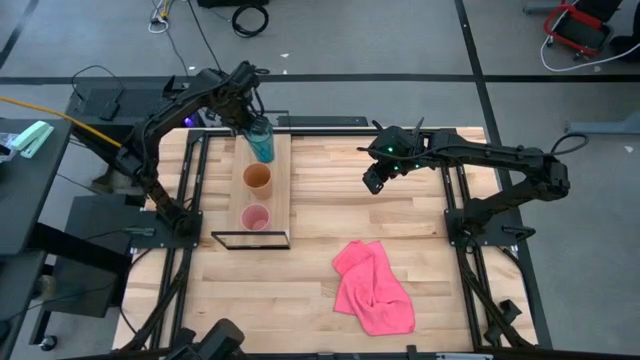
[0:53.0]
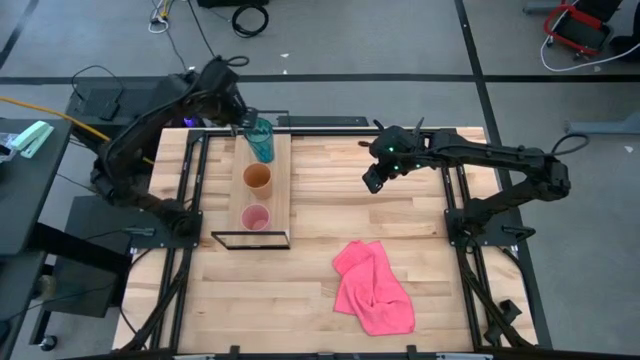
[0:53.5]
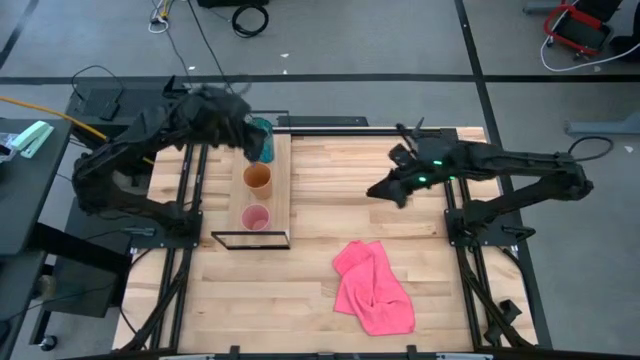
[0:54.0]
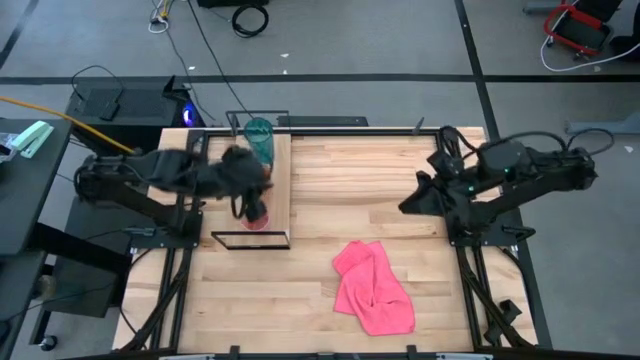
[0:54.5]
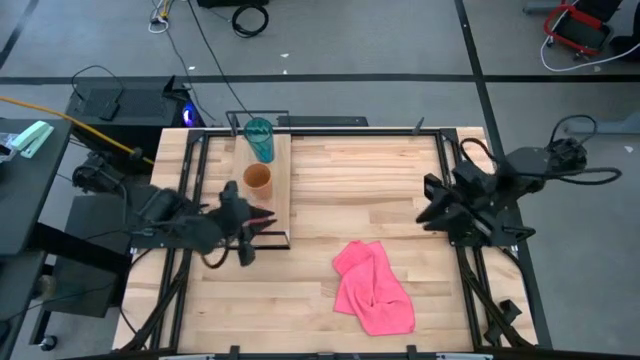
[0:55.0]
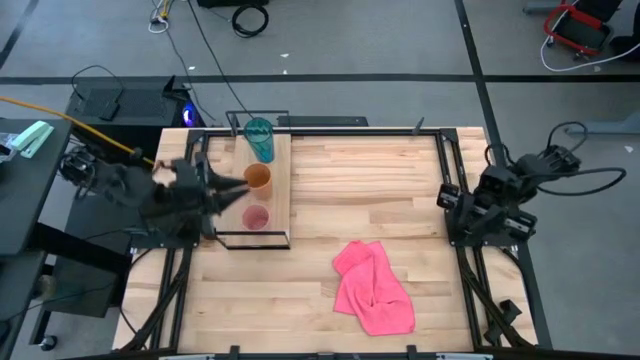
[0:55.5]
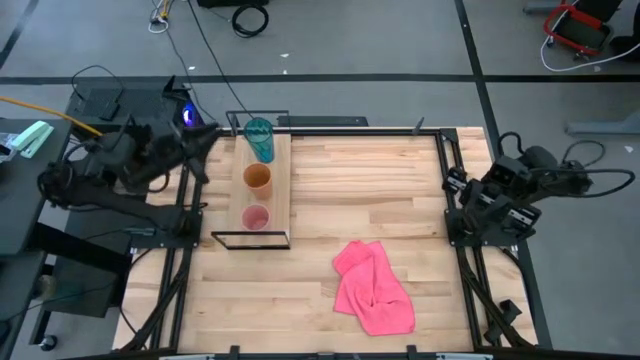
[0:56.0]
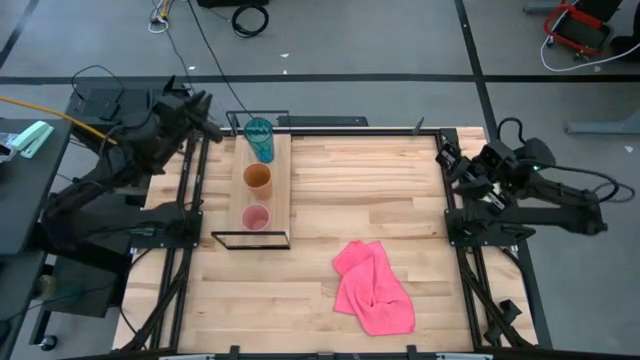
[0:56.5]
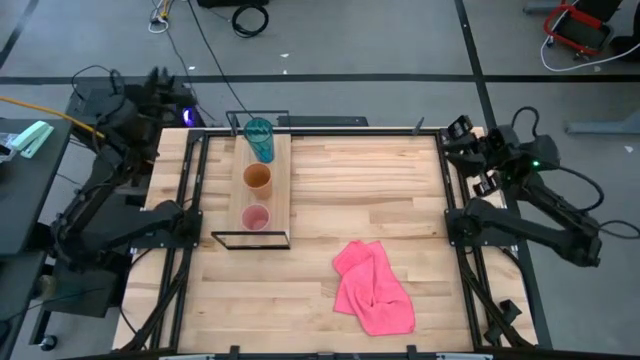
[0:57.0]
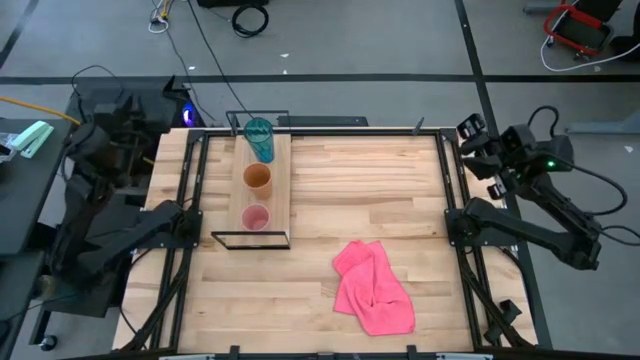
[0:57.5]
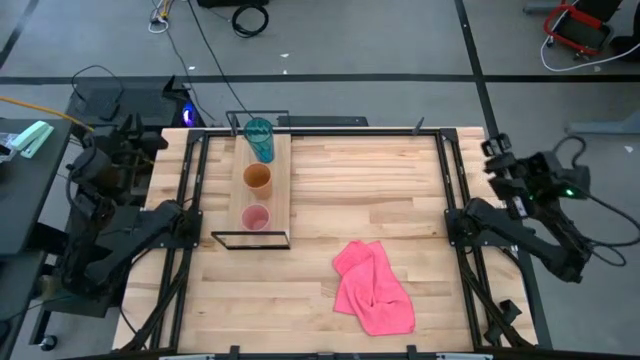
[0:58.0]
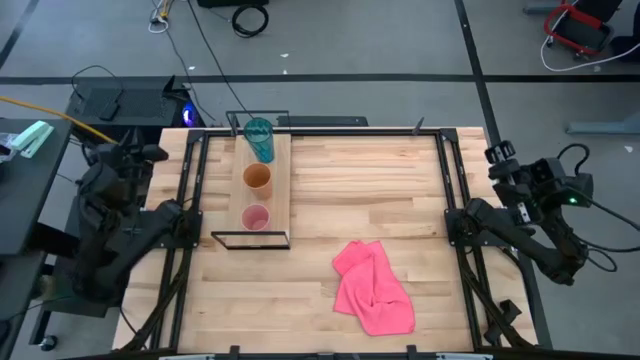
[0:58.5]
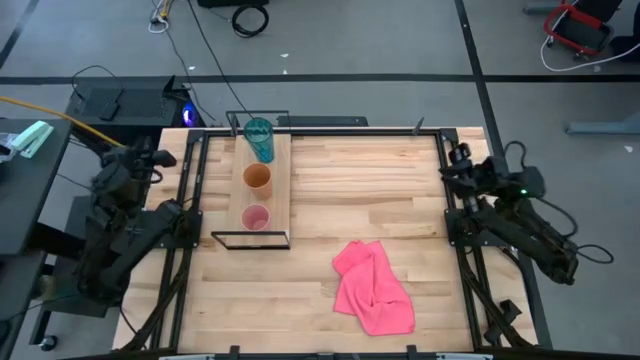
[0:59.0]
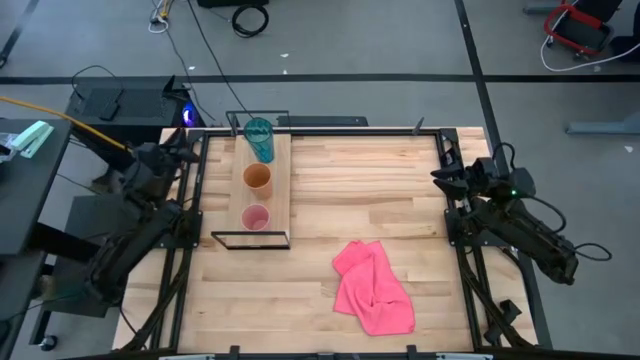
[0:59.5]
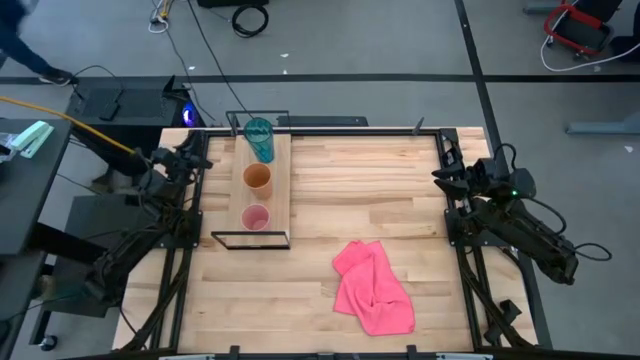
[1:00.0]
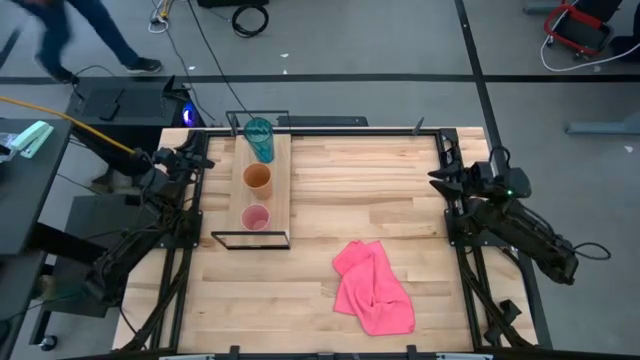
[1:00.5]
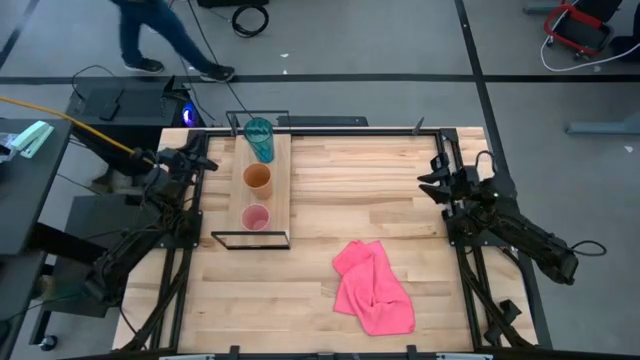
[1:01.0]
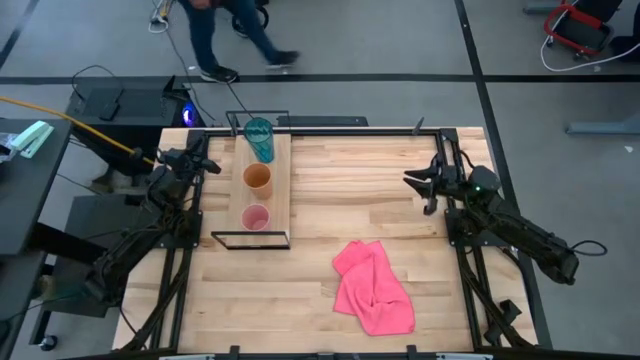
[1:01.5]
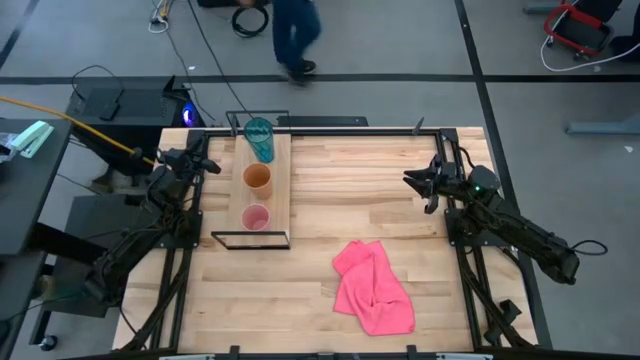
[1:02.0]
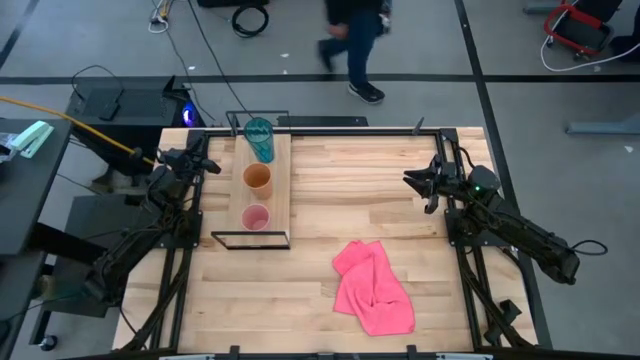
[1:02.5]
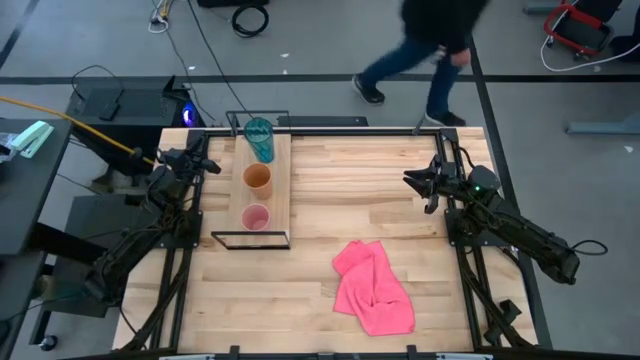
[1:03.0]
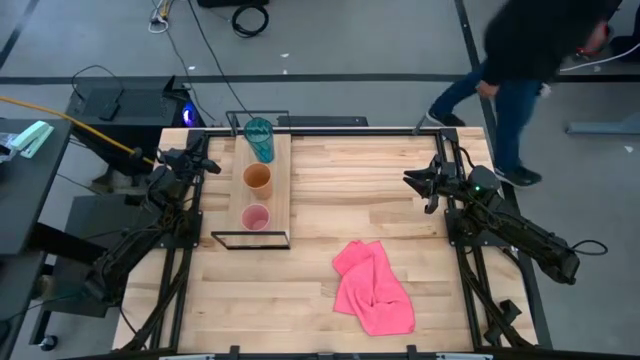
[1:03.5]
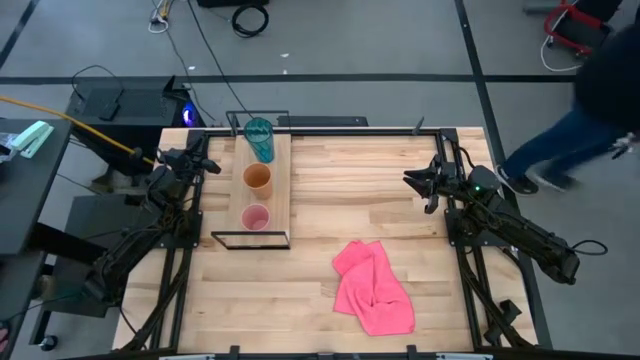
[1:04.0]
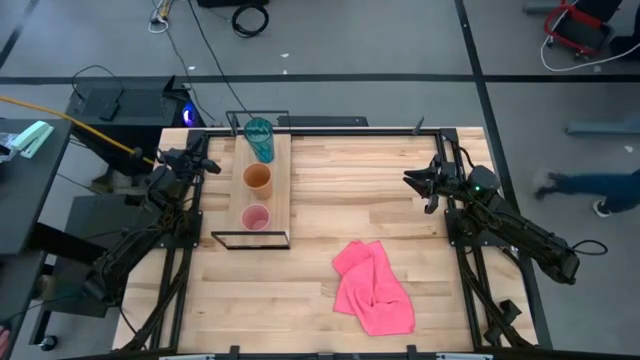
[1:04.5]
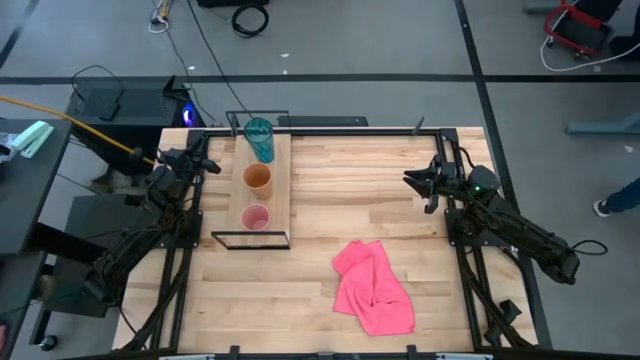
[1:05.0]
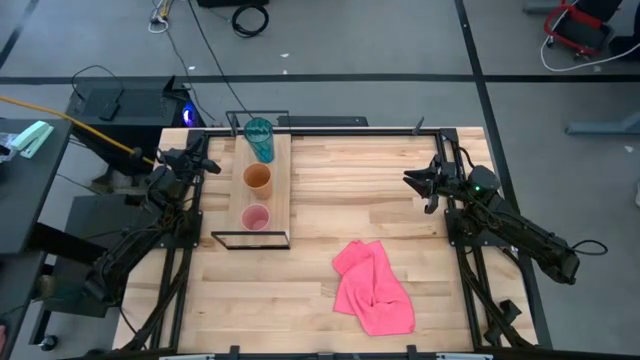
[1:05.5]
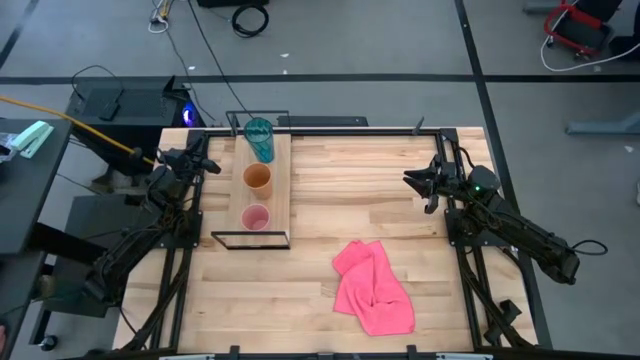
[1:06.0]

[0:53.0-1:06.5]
Task: Stack small to large cups/mugs on shelf
Return to Home Position

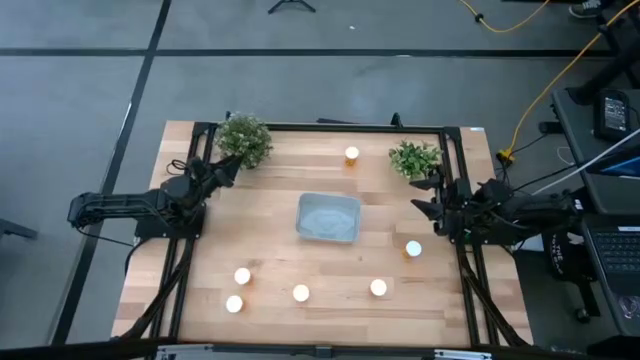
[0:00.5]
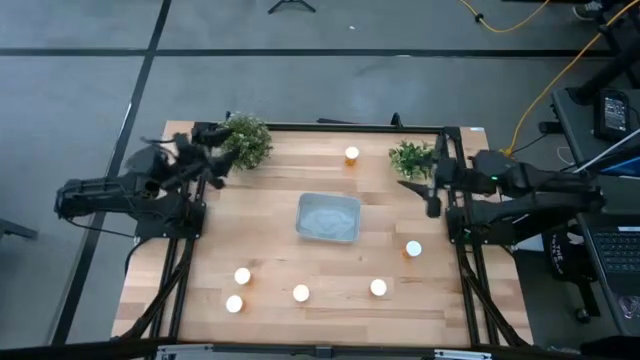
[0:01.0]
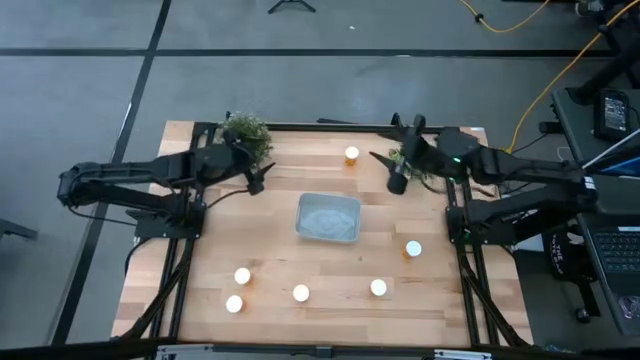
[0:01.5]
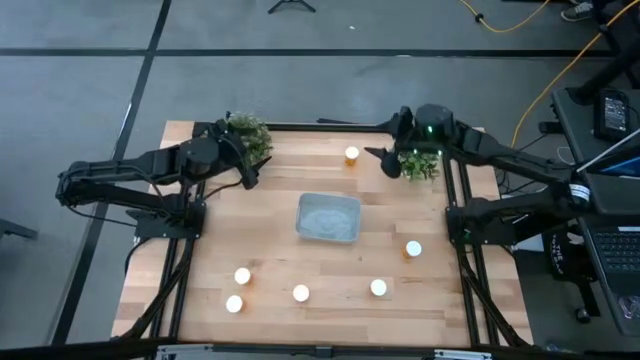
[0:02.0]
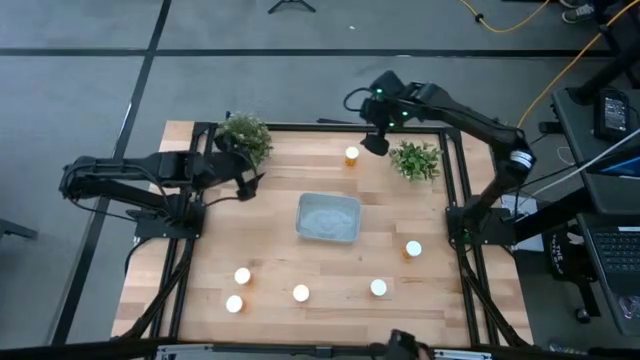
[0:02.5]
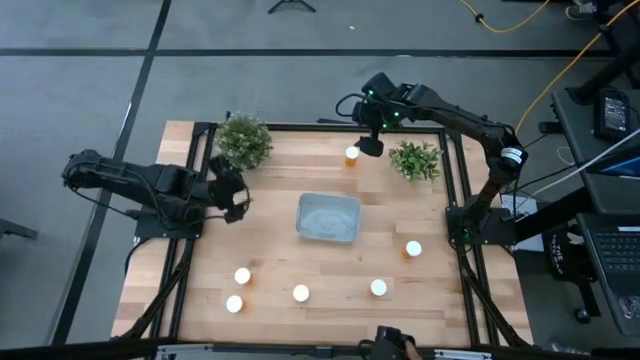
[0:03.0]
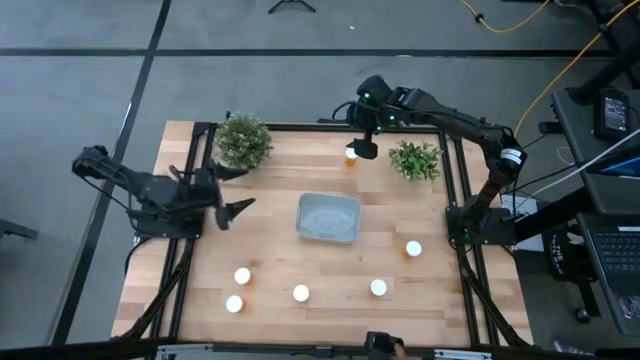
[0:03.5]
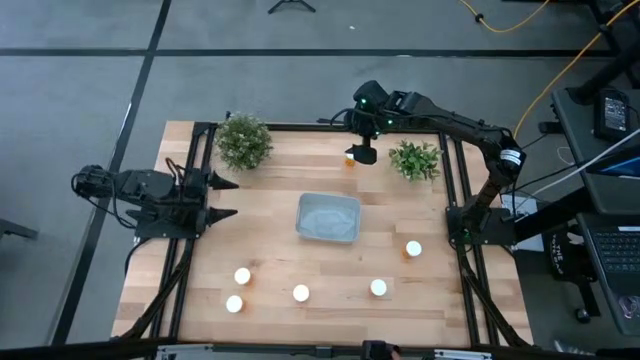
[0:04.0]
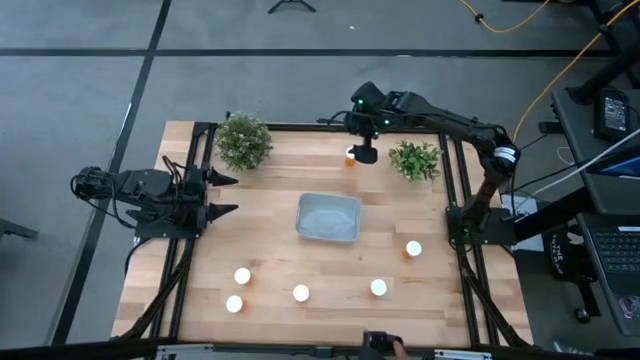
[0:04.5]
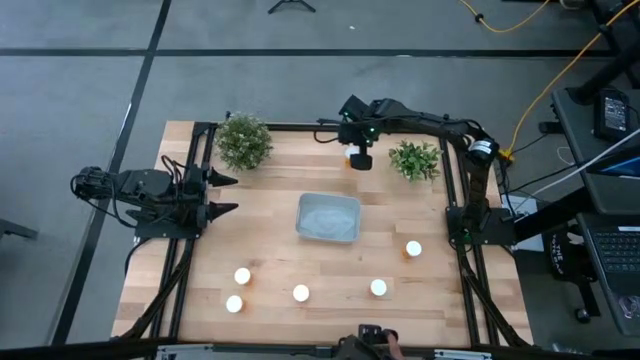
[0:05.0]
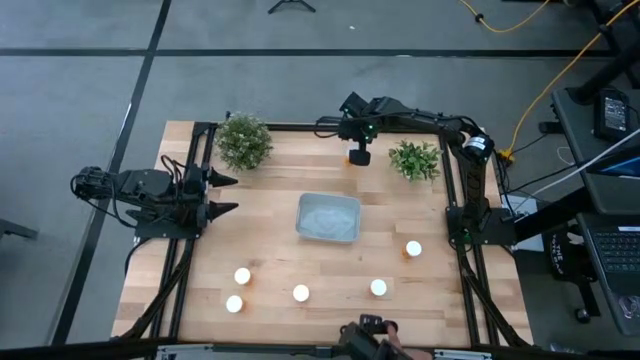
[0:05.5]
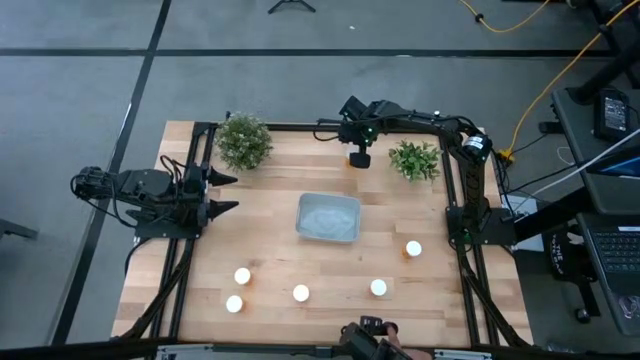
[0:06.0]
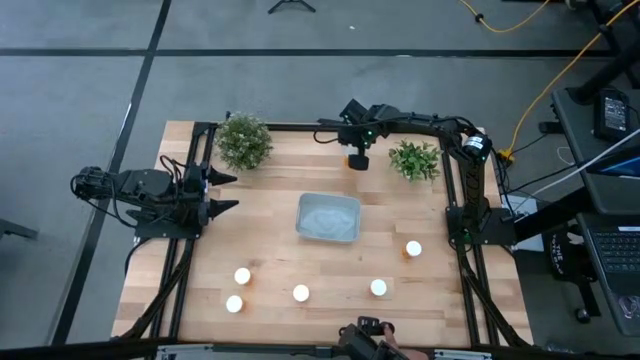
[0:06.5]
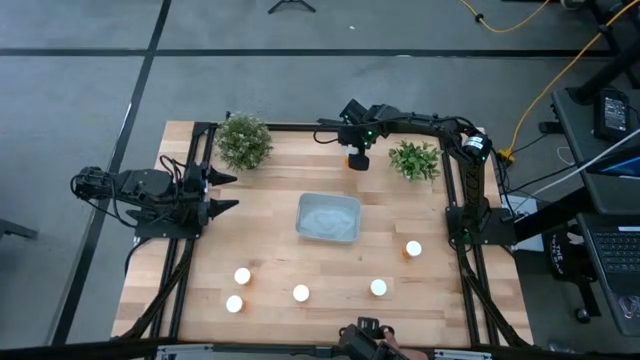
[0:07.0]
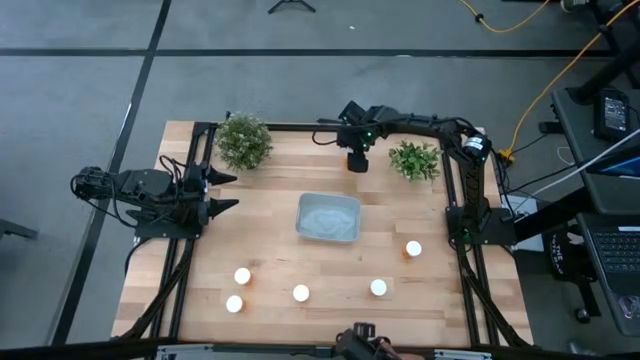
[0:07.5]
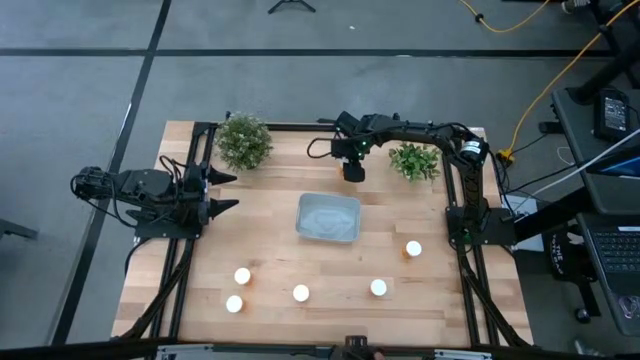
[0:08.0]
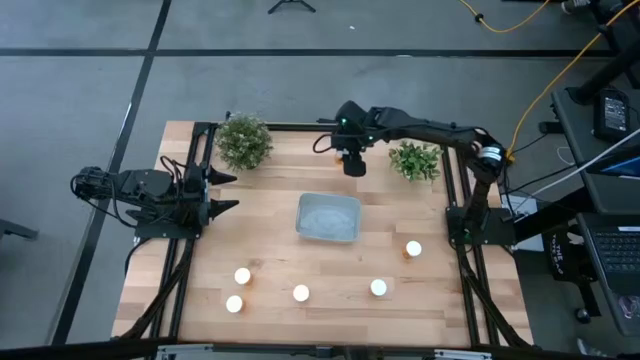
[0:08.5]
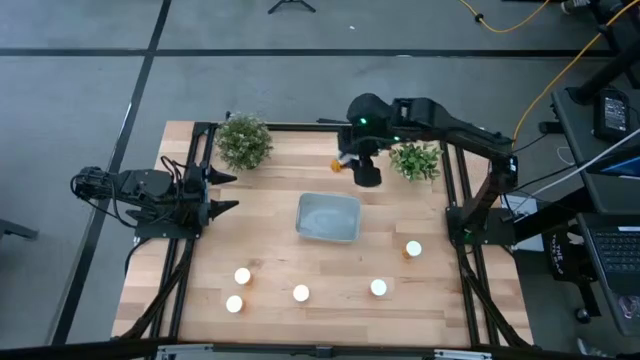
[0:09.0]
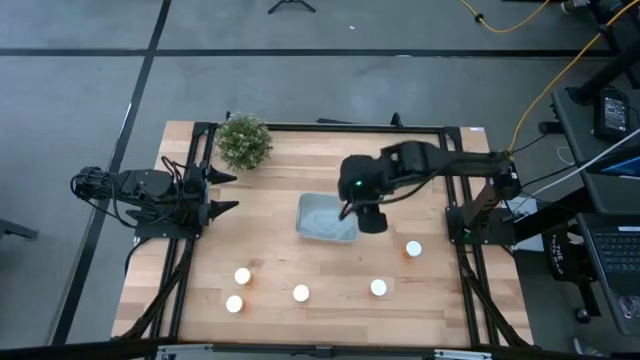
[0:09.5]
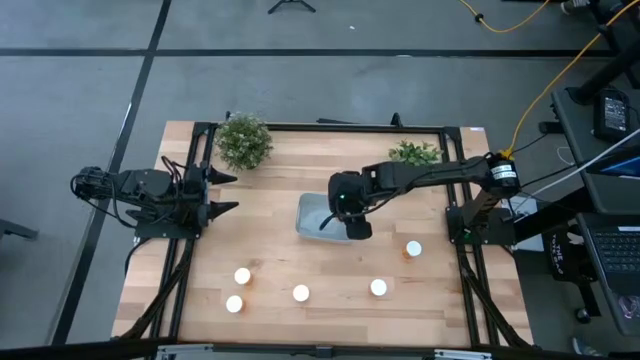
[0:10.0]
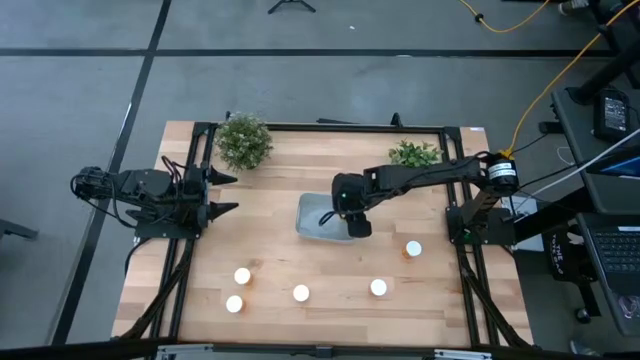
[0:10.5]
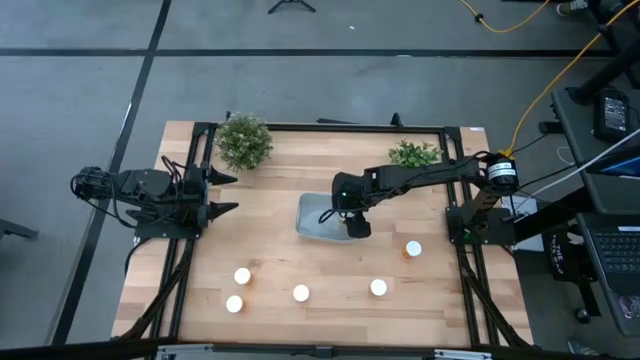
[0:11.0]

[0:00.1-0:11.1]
Task: Pick and place pill bottles into a basket
Put the orange pill bottle into the grey bin
